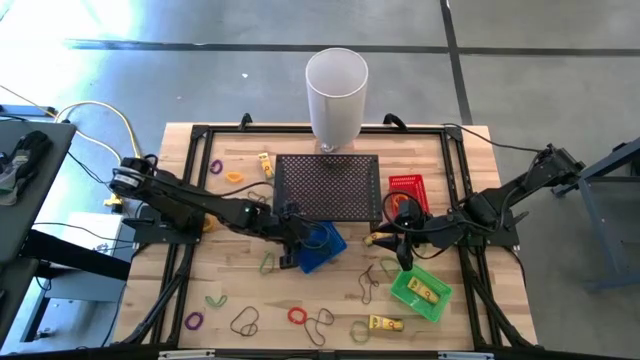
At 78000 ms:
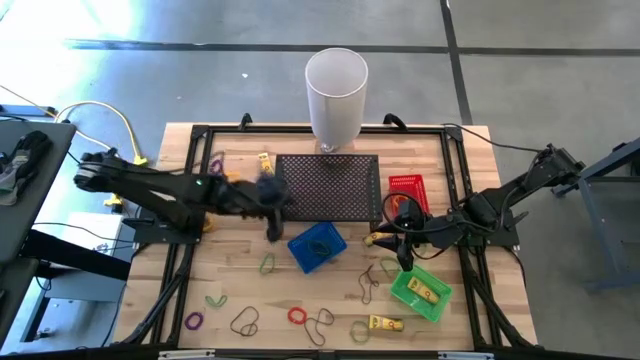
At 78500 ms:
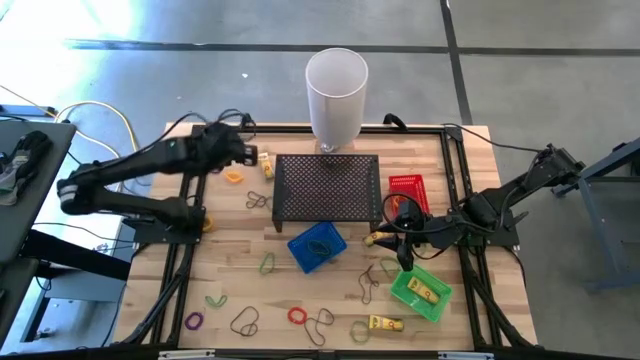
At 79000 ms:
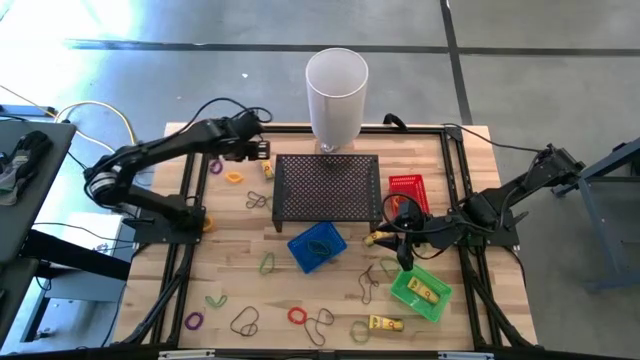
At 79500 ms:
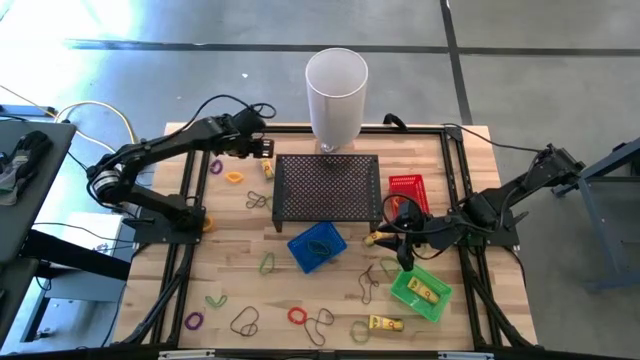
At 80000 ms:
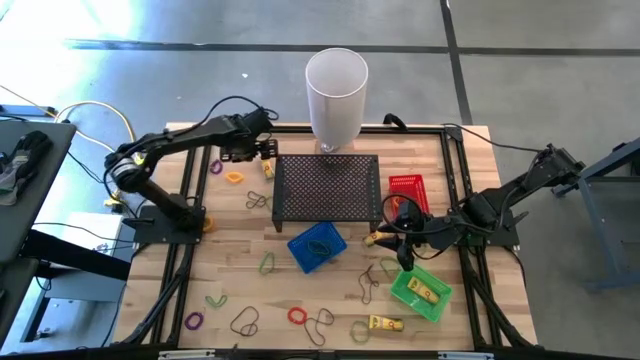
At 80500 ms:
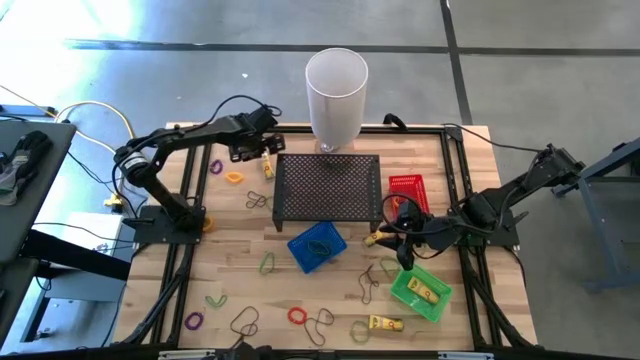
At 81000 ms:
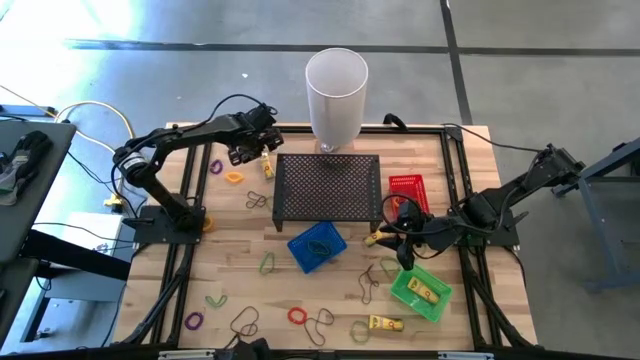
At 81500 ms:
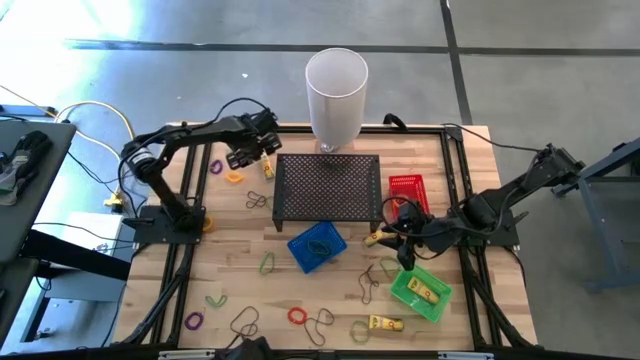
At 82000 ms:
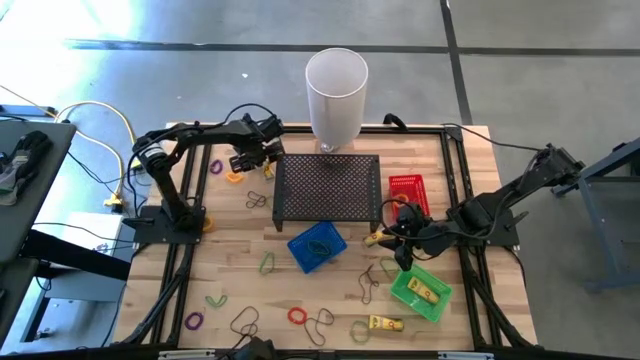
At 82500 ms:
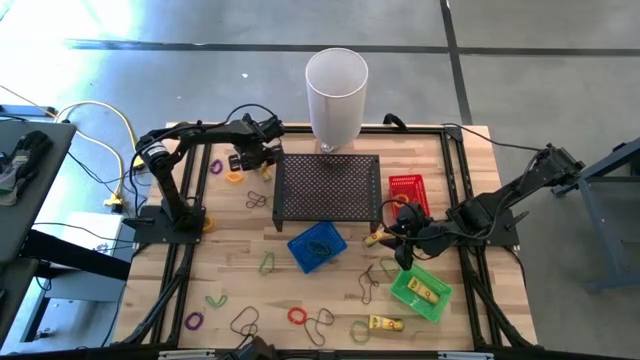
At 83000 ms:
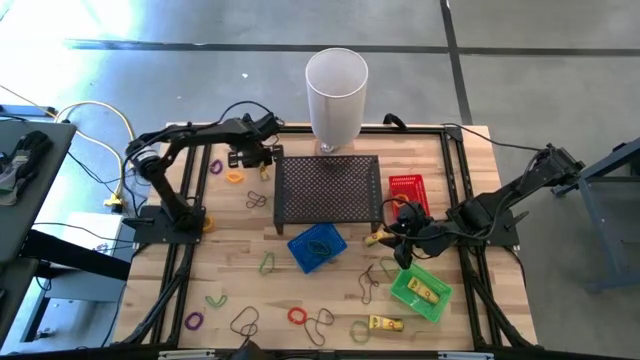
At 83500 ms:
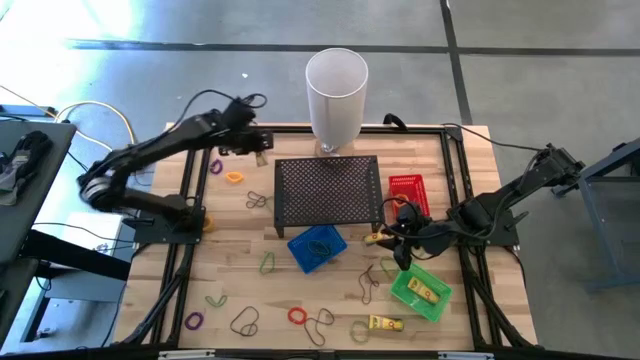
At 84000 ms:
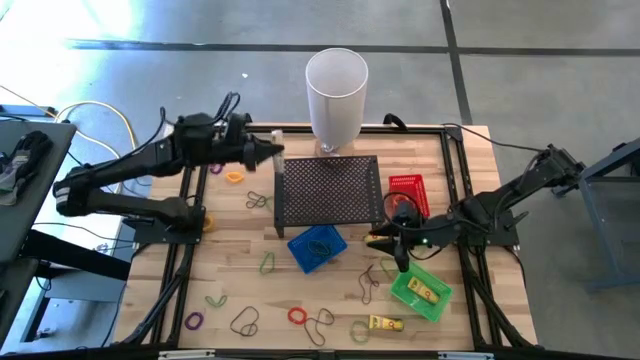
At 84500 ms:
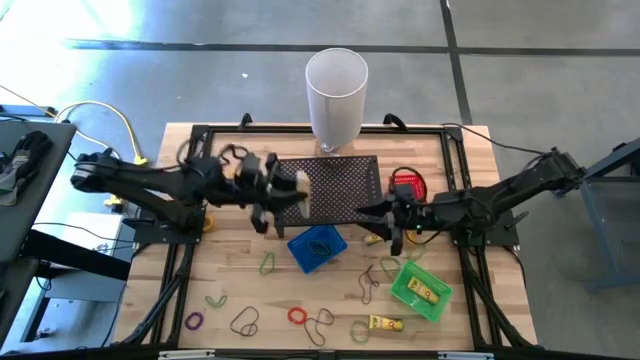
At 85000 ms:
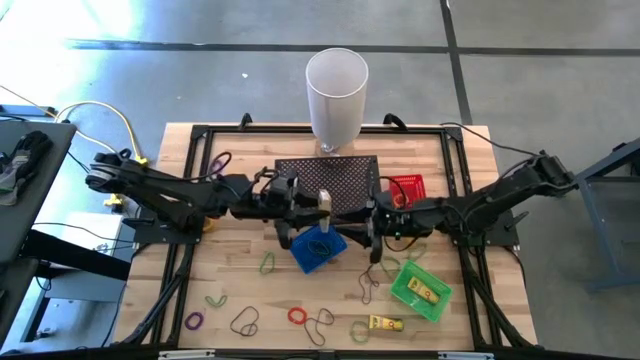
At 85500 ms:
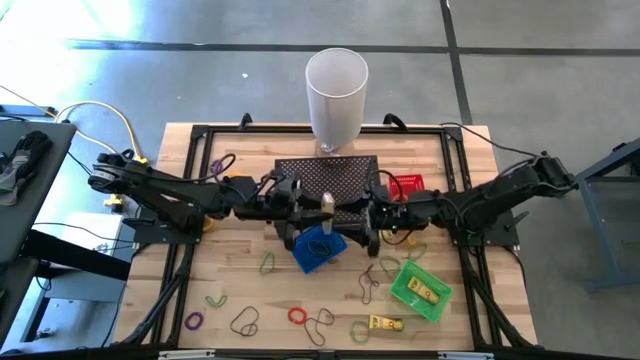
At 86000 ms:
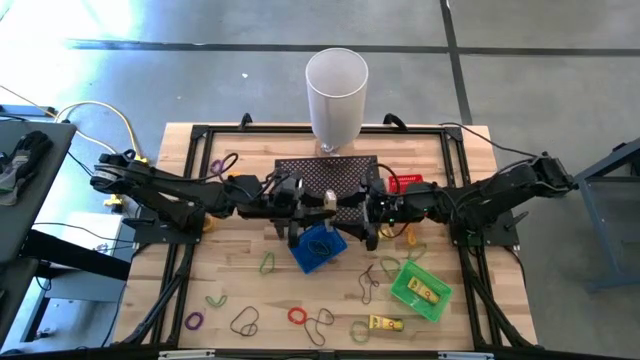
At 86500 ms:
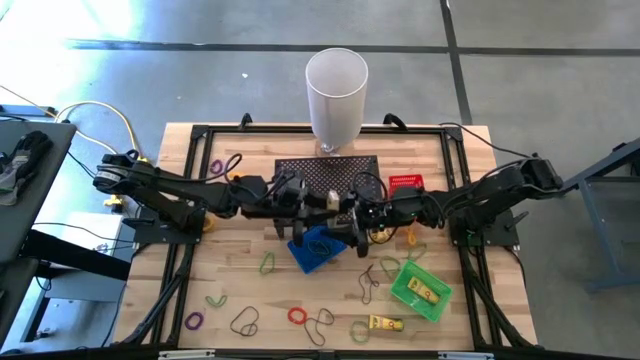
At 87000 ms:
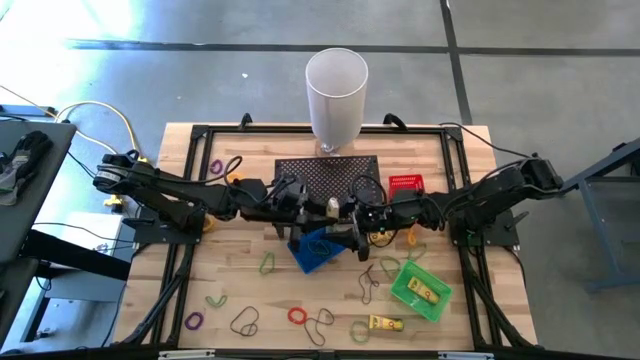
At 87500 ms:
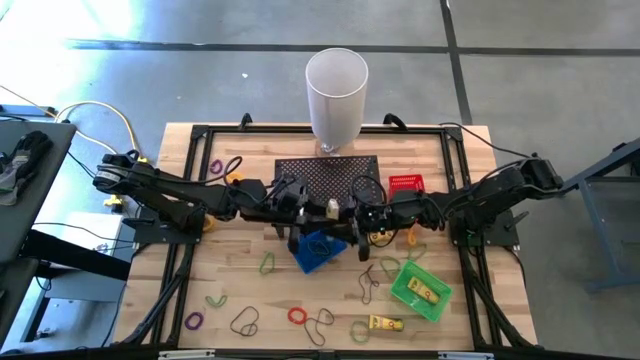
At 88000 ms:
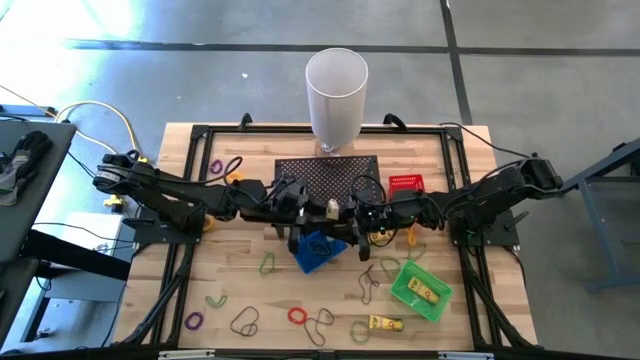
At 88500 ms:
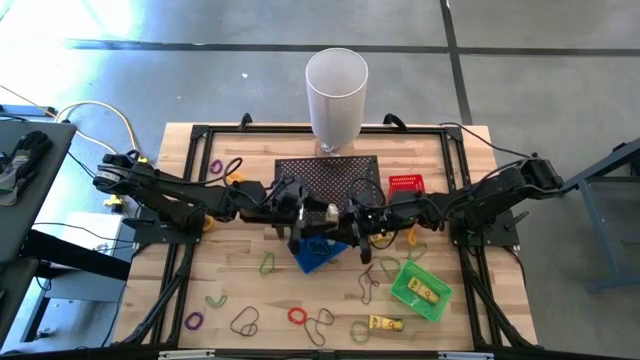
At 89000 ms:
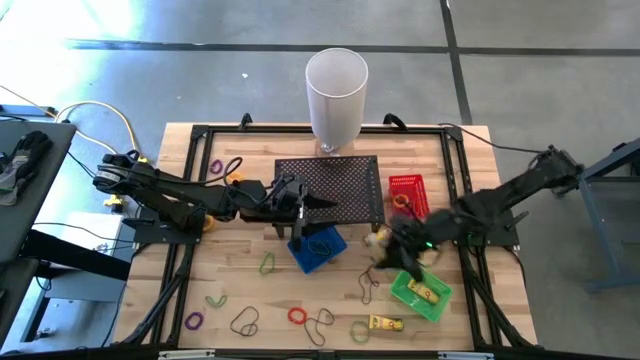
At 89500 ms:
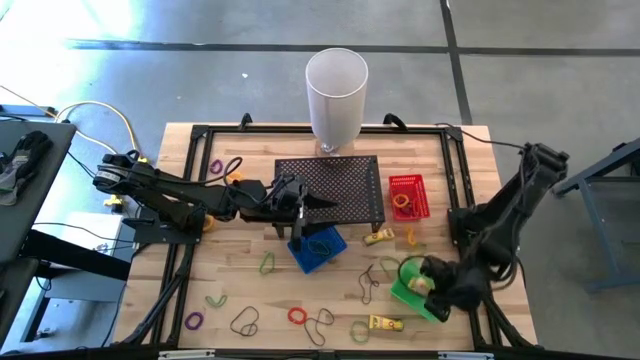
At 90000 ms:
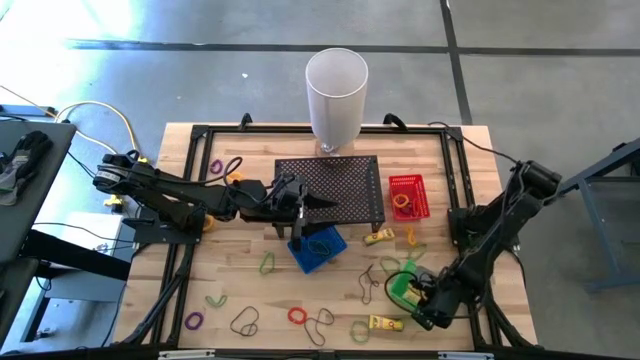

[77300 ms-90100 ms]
Task: Pick & Place Office Desk Supplies
Put the yellow crayon box into the green bin

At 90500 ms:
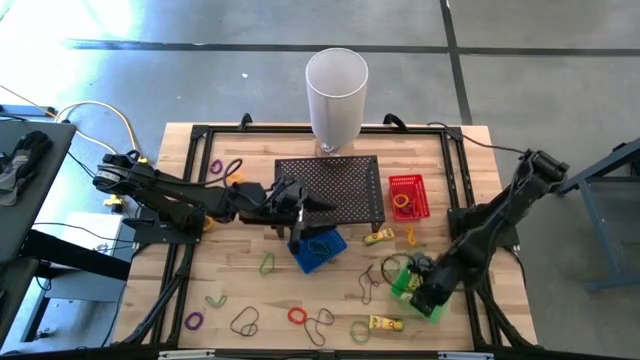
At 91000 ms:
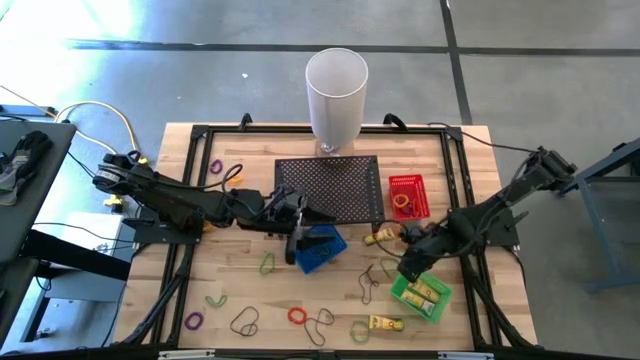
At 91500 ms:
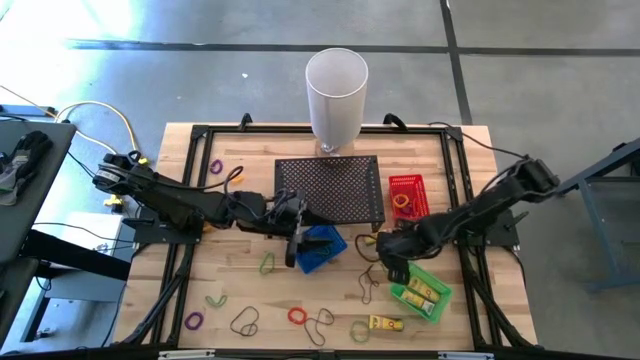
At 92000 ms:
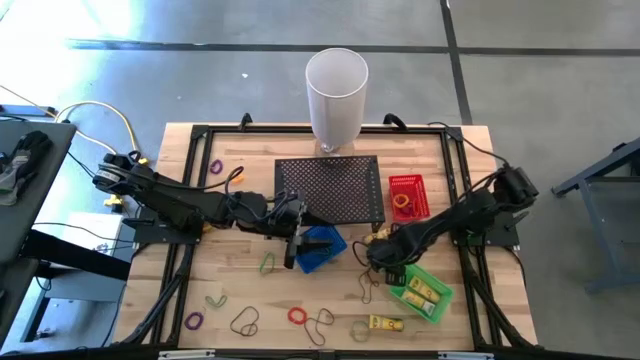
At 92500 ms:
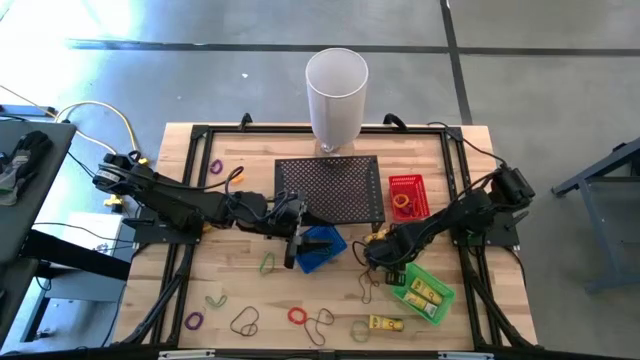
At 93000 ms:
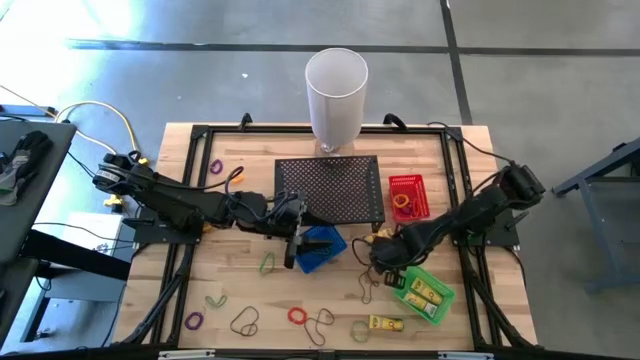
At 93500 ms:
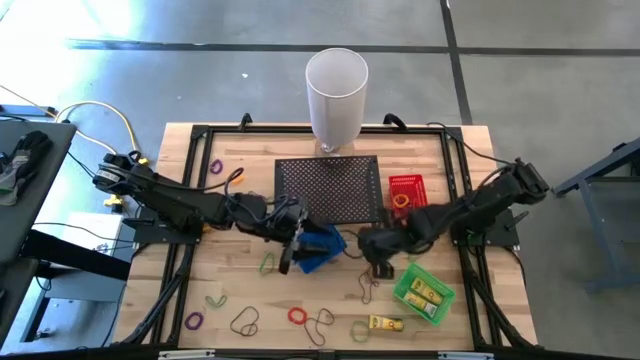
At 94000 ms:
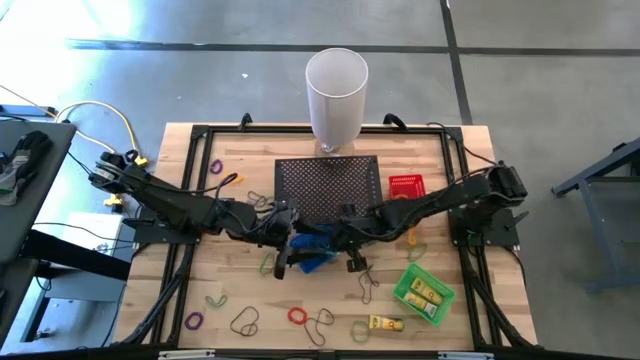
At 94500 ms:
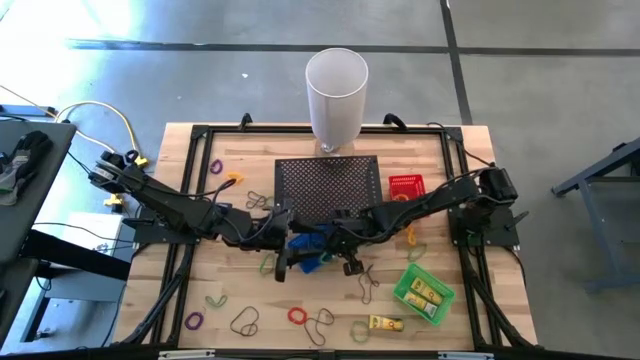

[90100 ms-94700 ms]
Put the green rubber band into the blue bin

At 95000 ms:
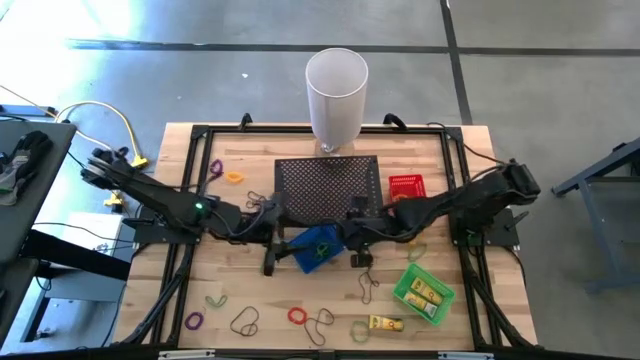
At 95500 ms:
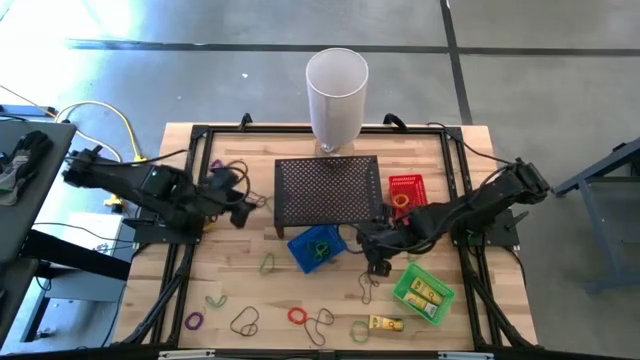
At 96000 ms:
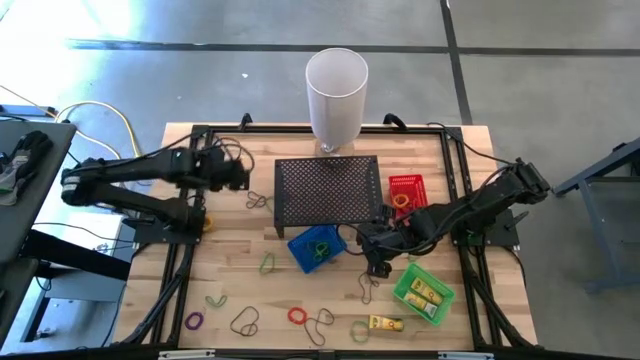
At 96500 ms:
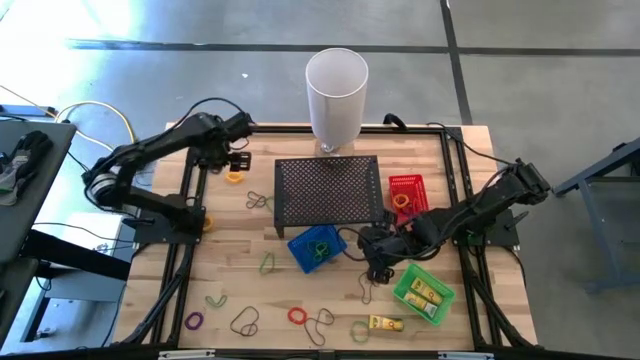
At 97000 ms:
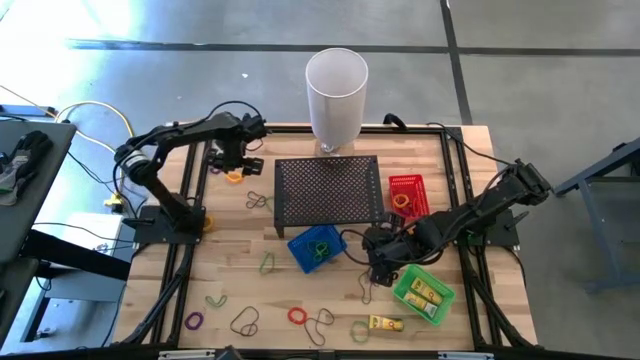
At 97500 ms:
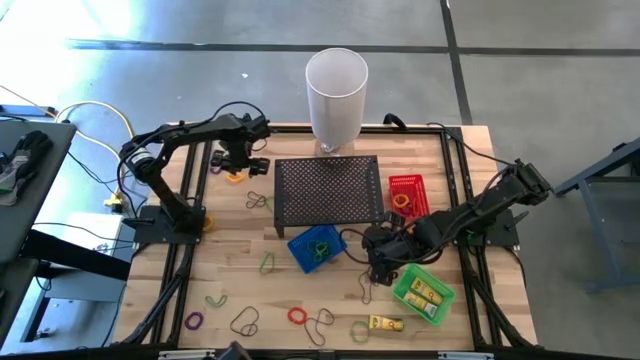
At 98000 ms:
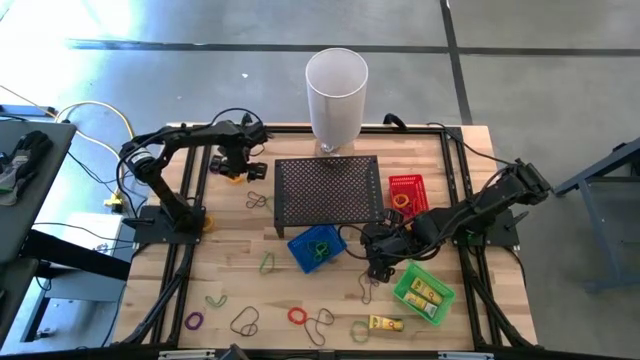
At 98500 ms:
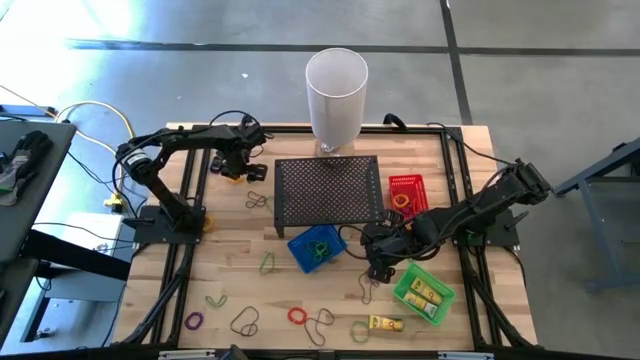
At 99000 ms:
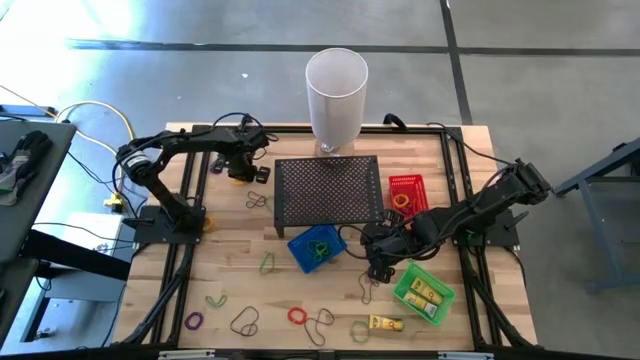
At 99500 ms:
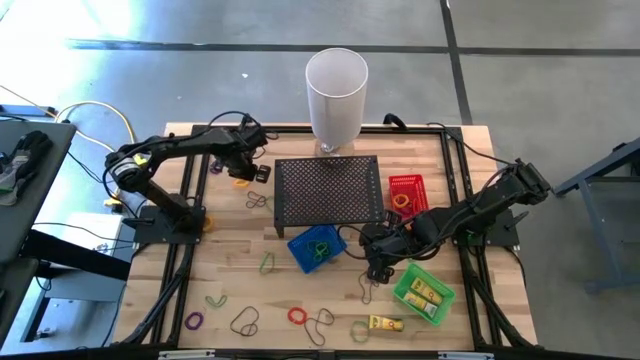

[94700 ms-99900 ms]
Put the yellow spring keychain into the red bin
